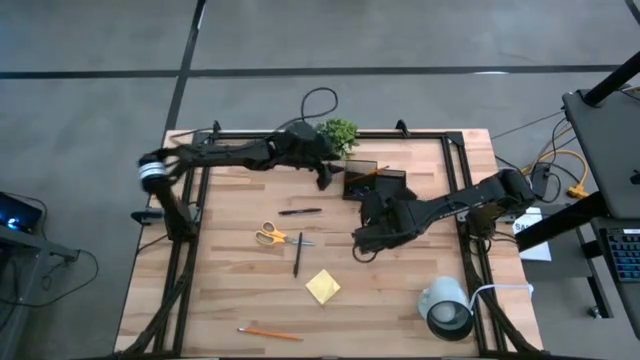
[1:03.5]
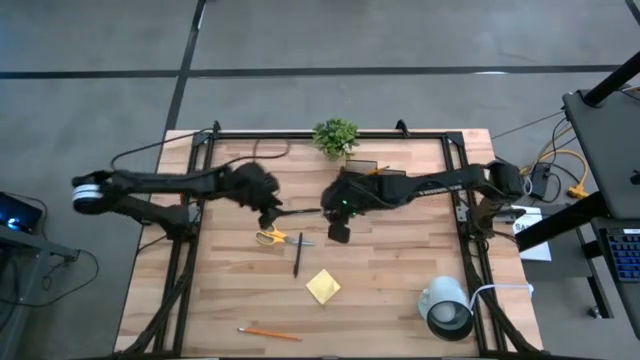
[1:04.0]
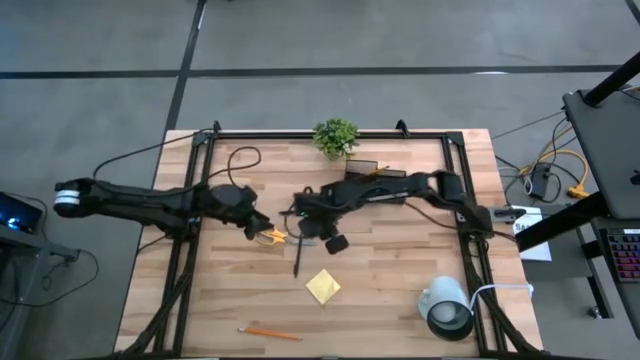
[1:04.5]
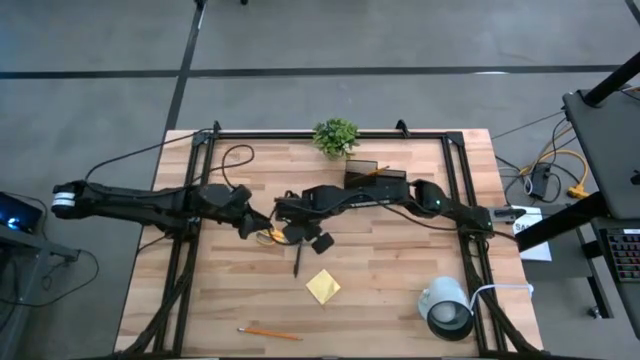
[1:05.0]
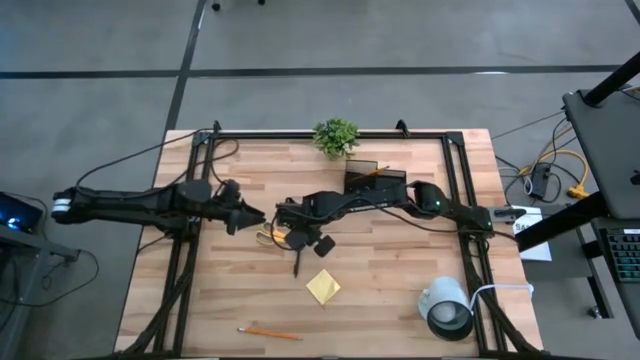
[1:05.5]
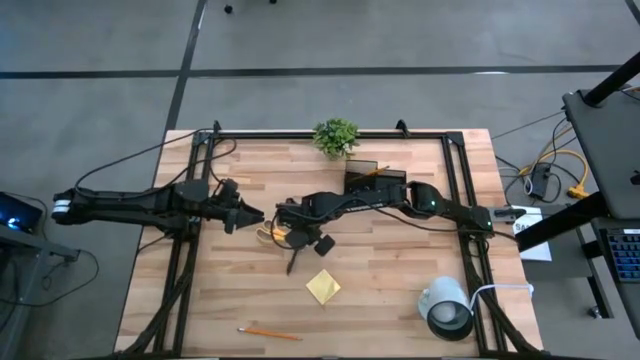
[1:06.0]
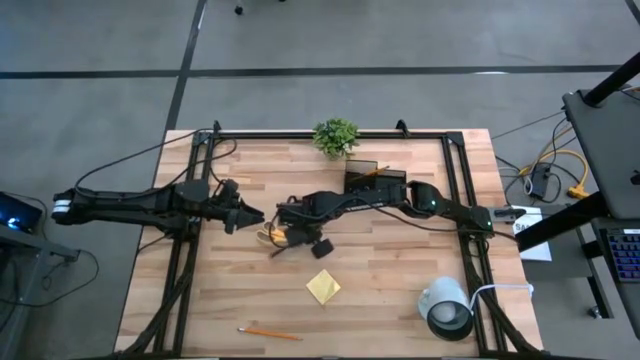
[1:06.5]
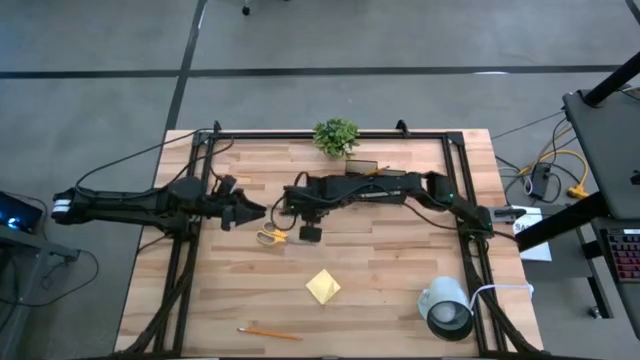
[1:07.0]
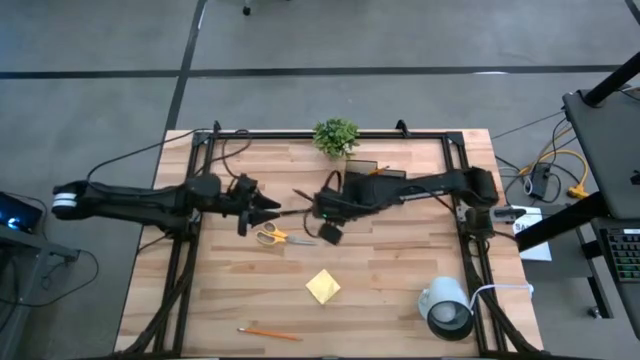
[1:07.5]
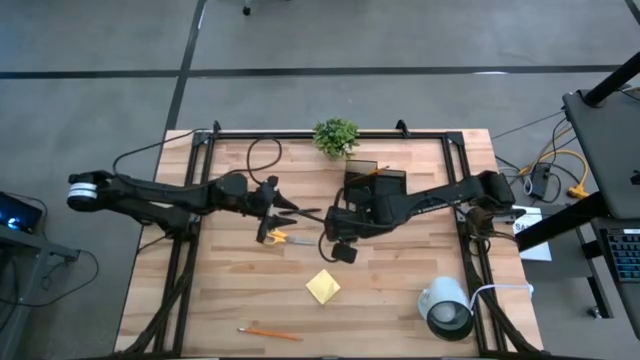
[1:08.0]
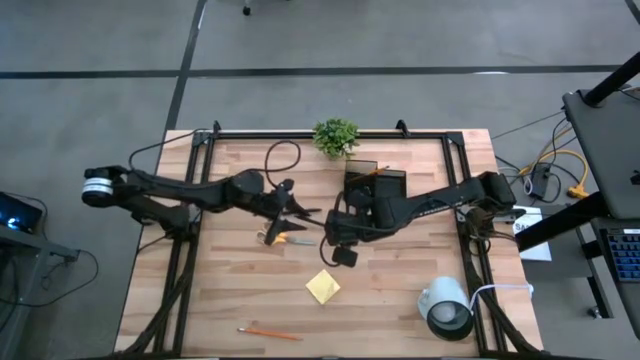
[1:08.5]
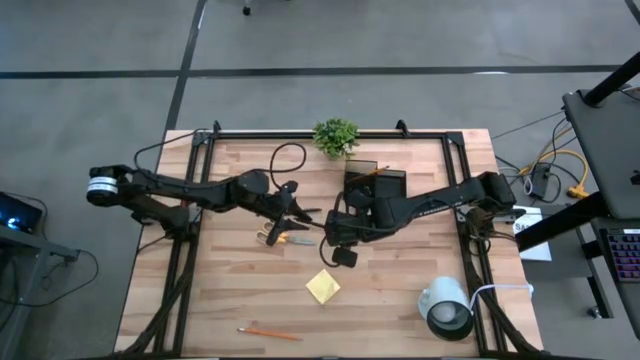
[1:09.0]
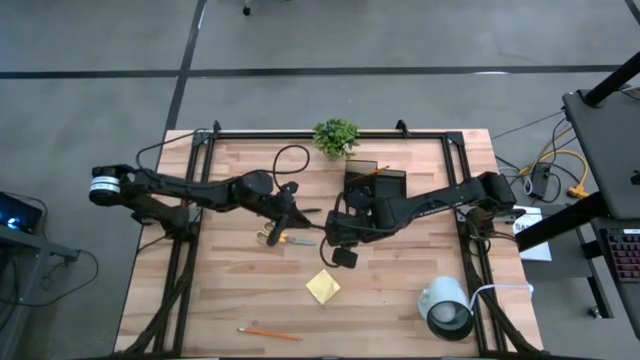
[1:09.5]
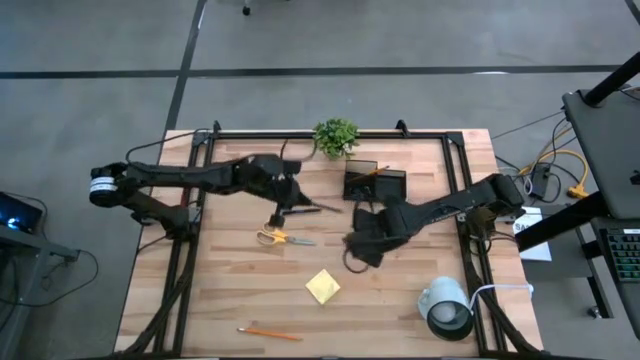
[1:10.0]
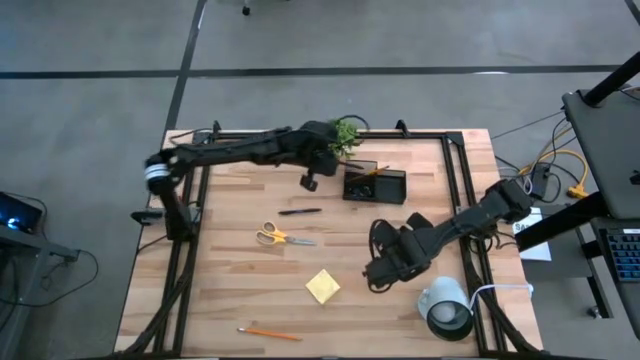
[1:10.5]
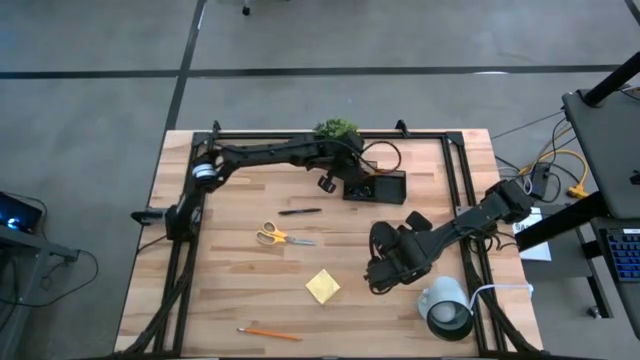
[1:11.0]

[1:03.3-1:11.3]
Task: Pick and place office supplies into organizer
Put the bottom black pen into the desk organizer

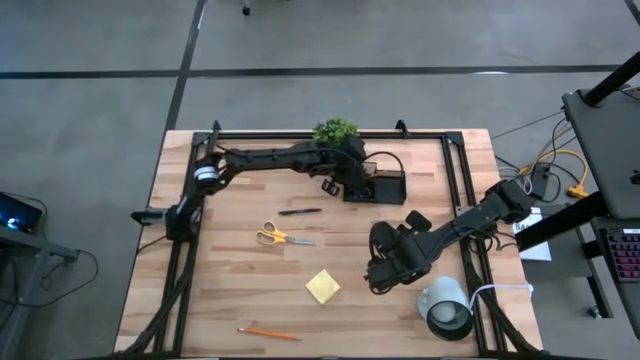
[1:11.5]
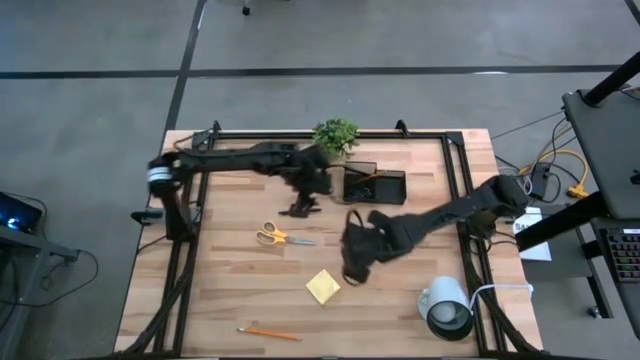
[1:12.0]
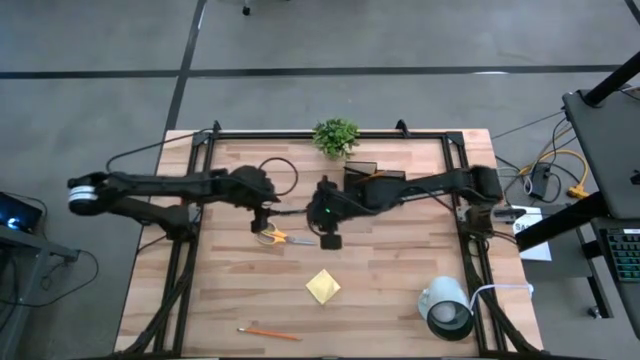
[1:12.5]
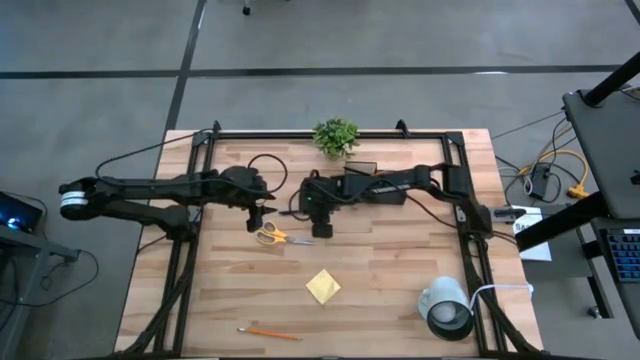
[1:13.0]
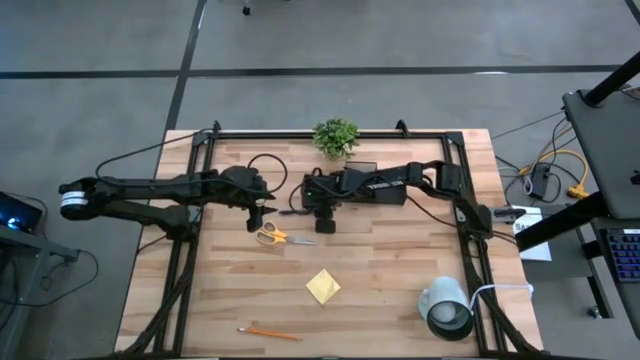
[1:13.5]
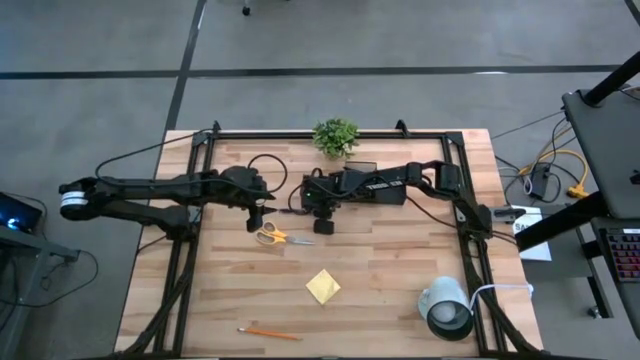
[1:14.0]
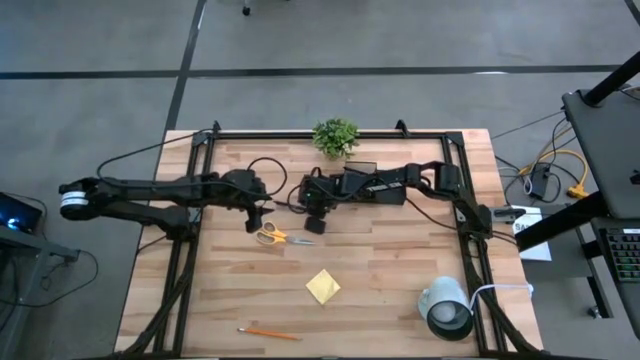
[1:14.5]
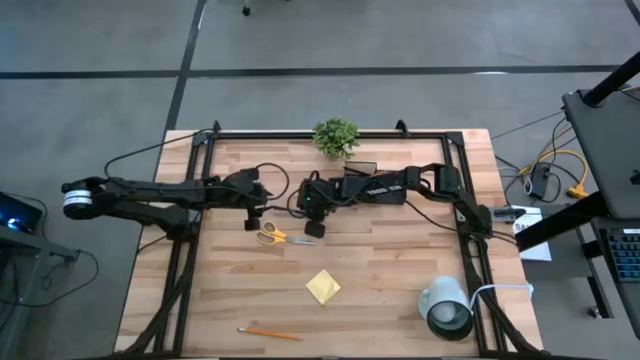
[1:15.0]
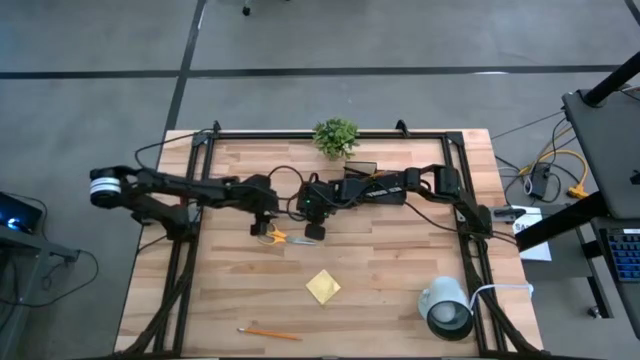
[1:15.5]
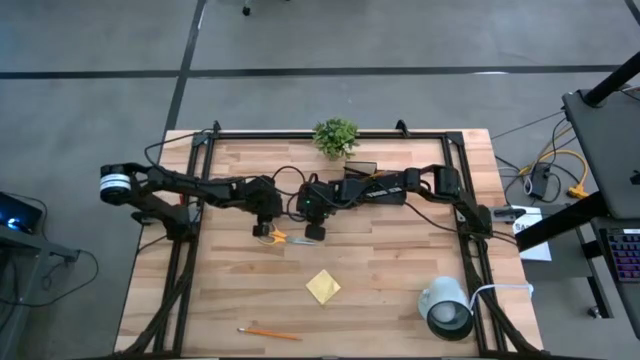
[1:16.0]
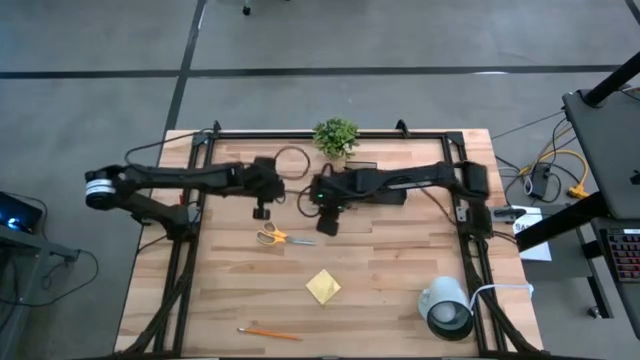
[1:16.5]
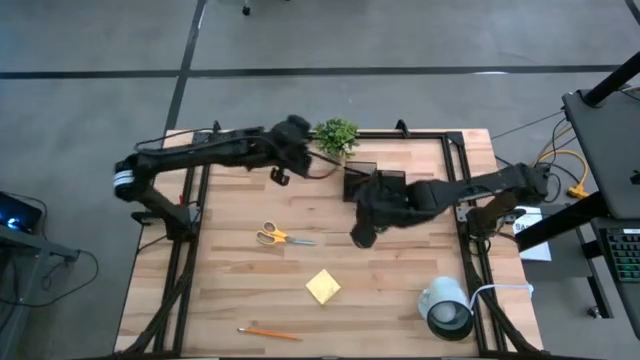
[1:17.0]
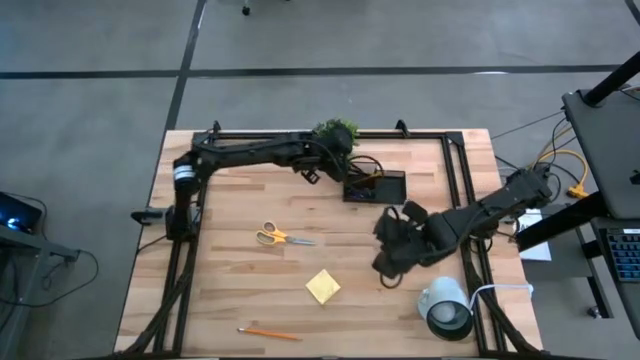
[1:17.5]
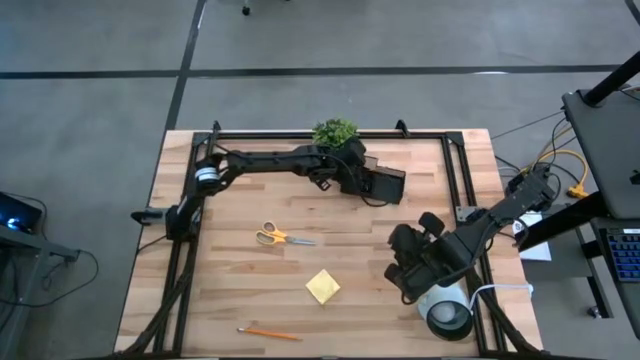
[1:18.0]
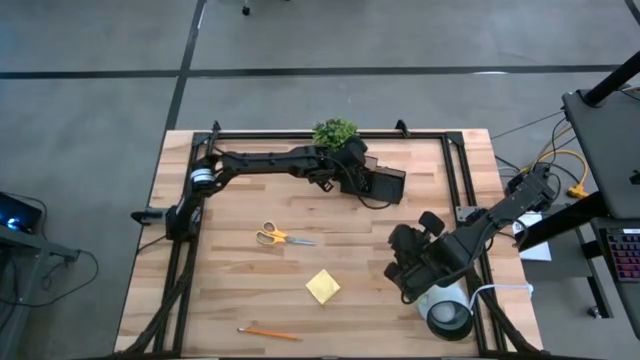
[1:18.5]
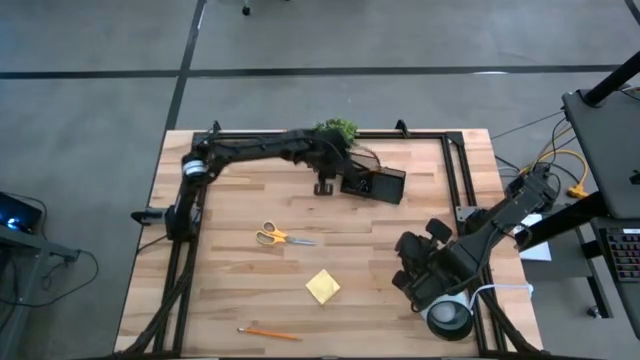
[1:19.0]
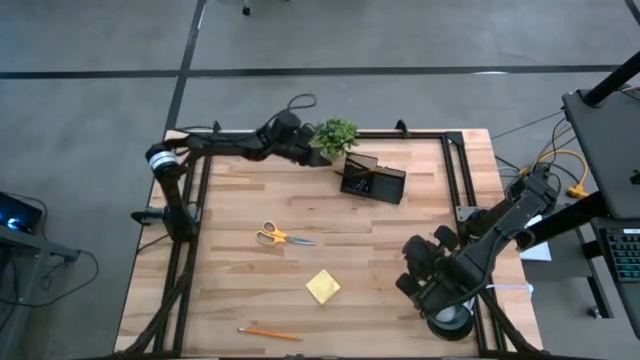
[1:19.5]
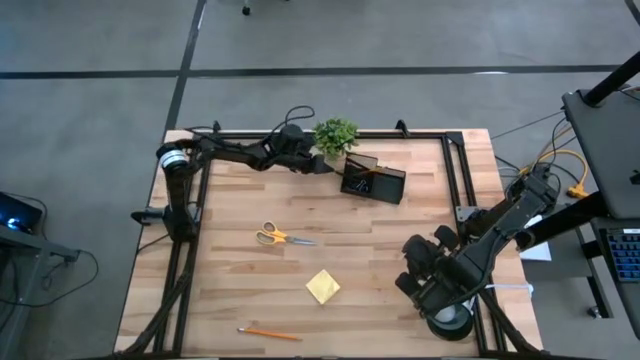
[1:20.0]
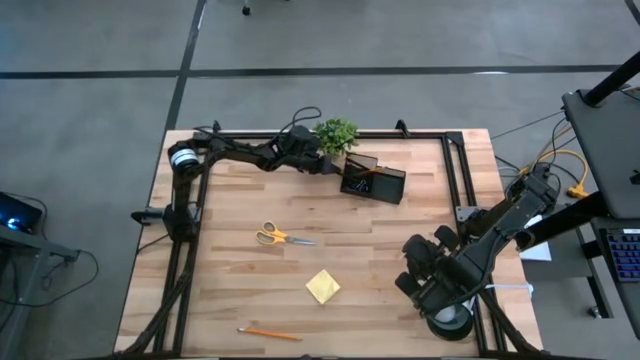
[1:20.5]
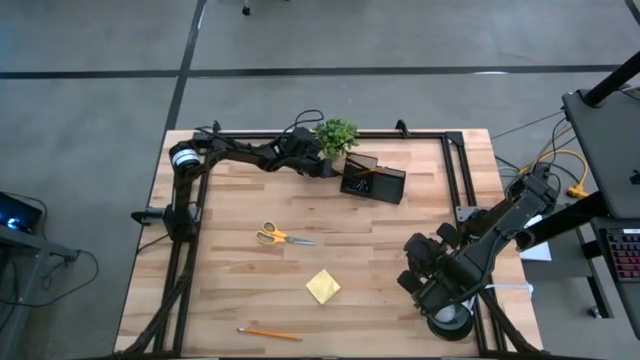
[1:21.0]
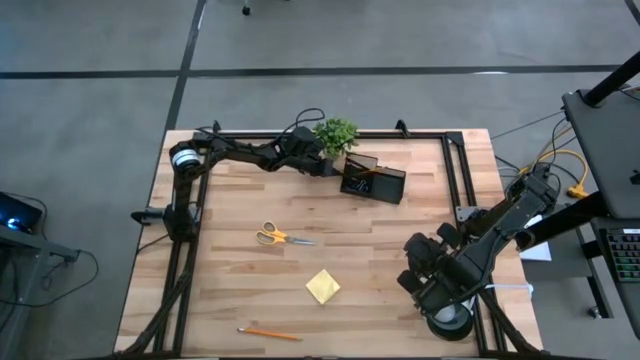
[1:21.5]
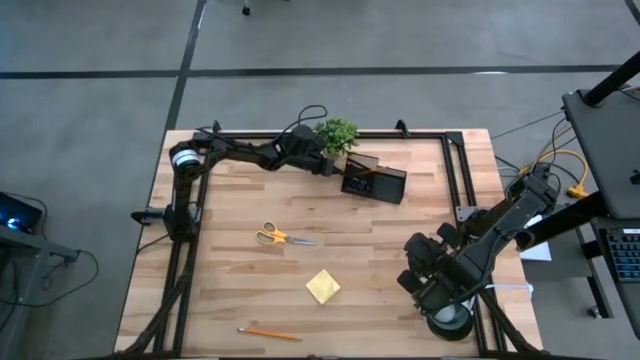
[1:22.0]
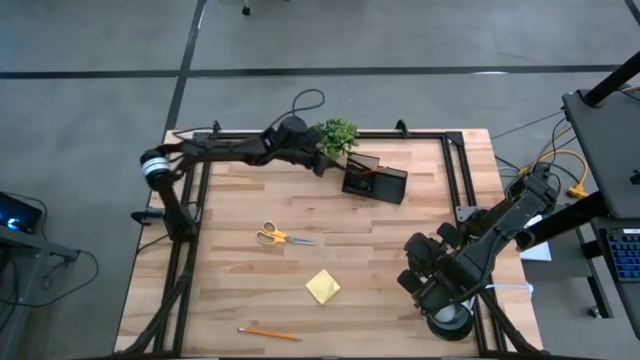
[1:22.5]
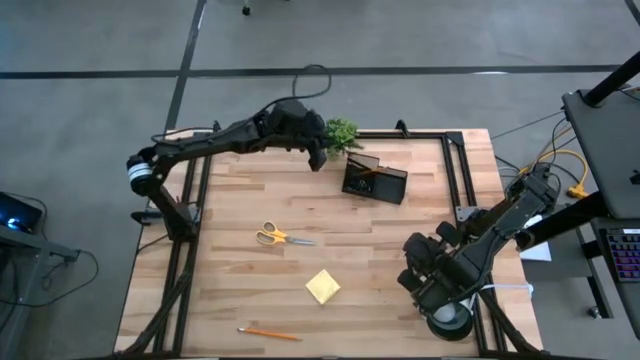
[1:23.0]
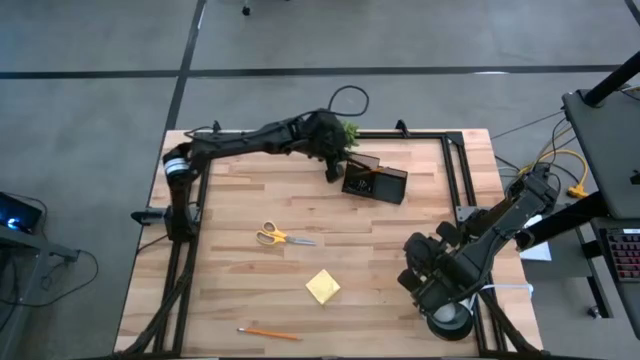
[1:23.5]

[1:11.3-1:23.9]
Put the black pen into the desk organizer

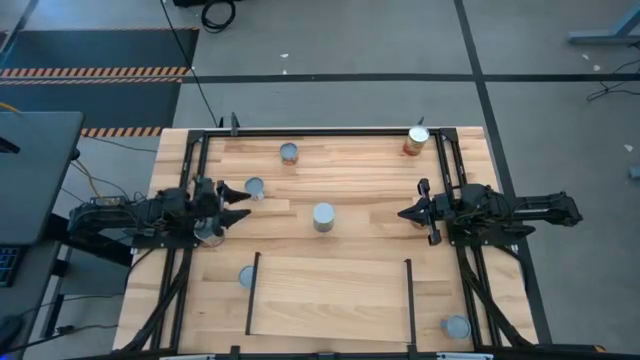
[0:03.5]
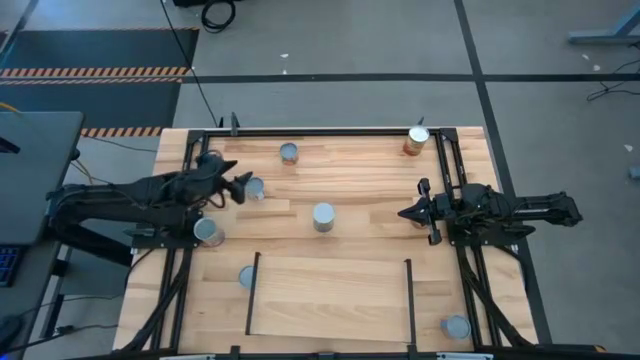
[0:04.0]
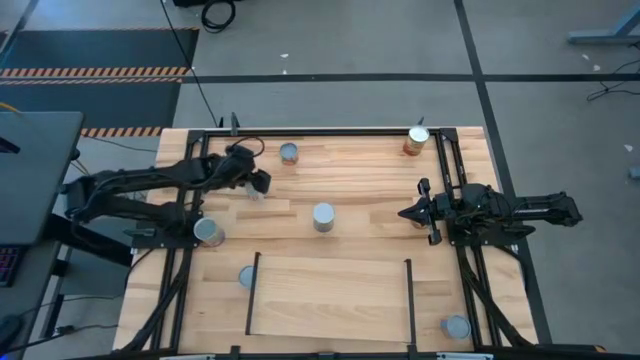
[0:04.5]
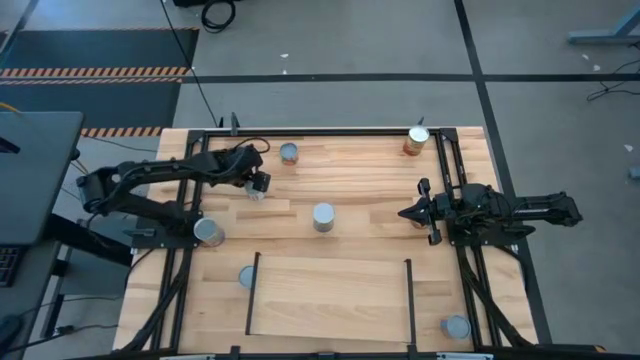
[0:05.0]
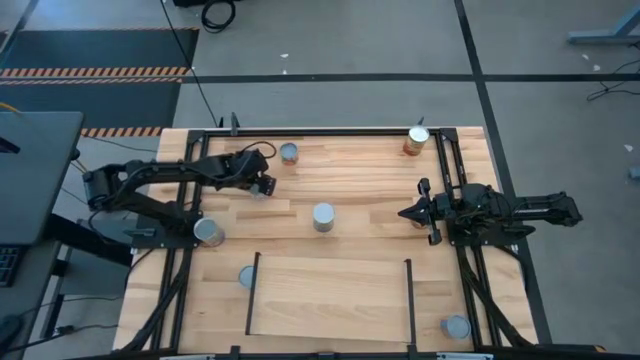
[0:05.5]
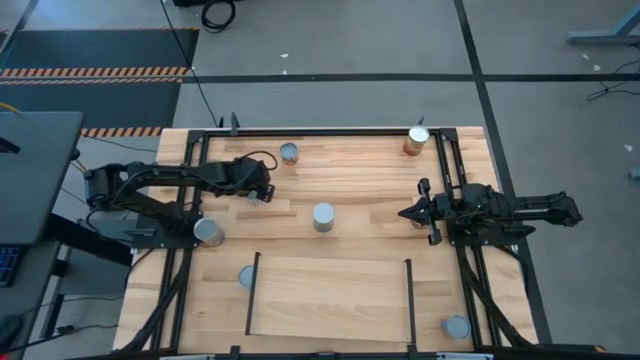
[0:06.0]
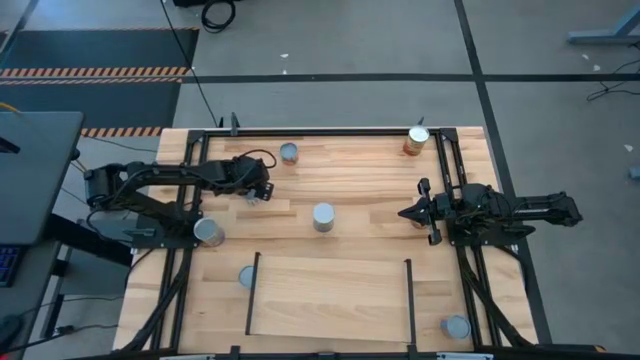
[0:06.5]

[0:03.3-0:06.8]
Task: Pick and place cans onto a shelf
Put the canned carrot on the shelf
